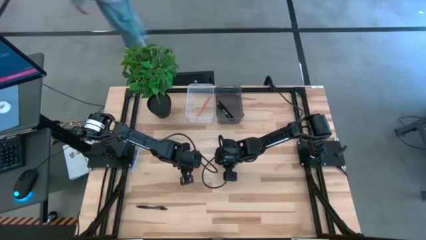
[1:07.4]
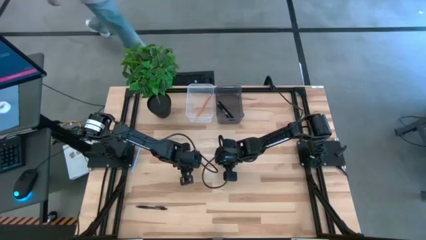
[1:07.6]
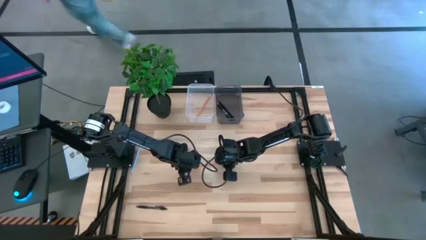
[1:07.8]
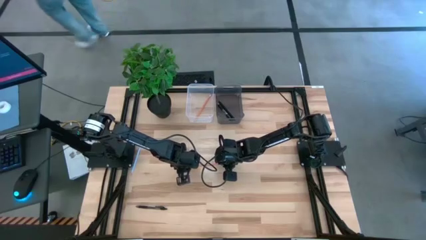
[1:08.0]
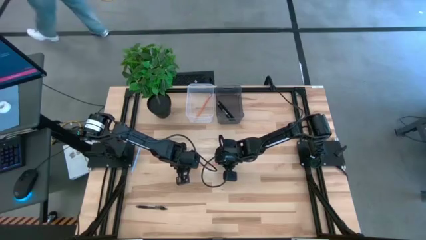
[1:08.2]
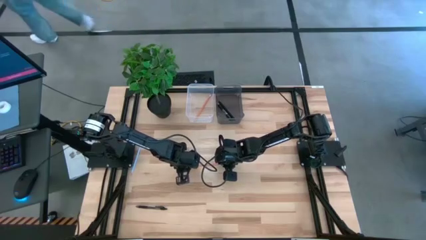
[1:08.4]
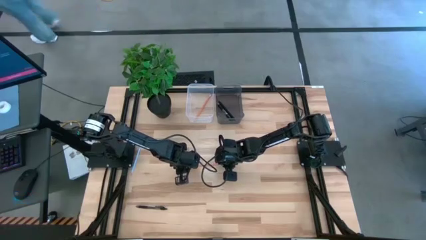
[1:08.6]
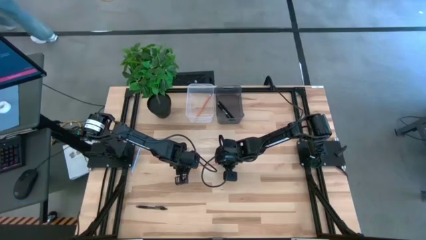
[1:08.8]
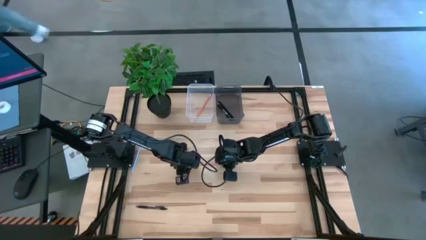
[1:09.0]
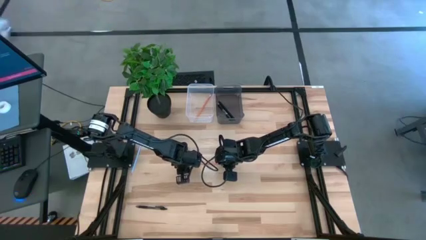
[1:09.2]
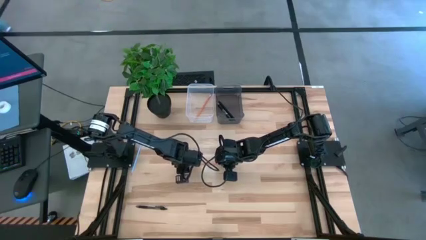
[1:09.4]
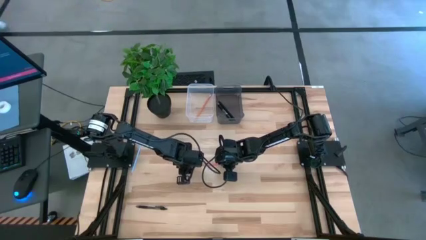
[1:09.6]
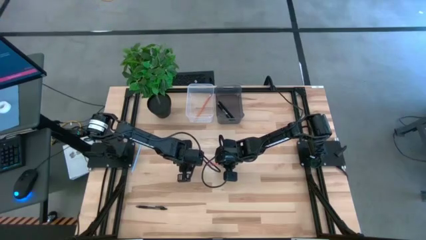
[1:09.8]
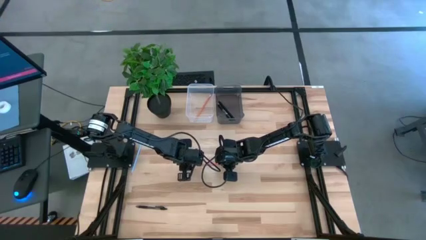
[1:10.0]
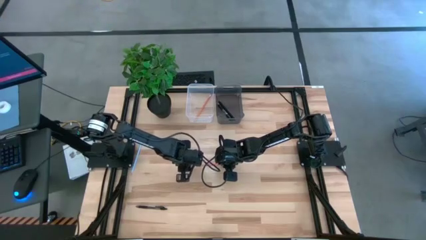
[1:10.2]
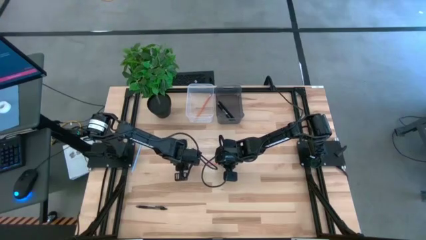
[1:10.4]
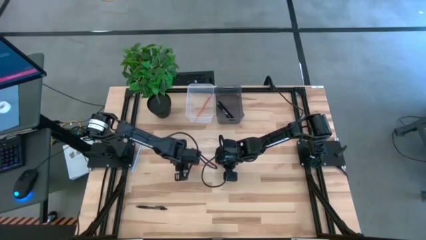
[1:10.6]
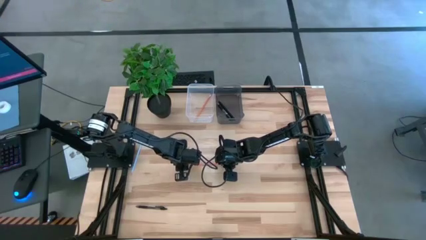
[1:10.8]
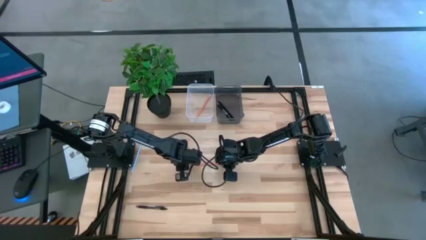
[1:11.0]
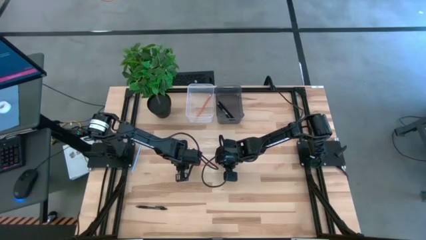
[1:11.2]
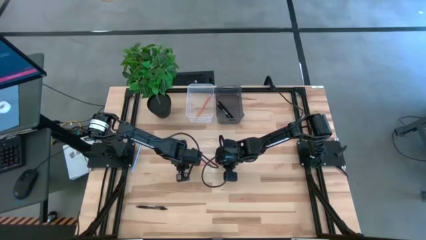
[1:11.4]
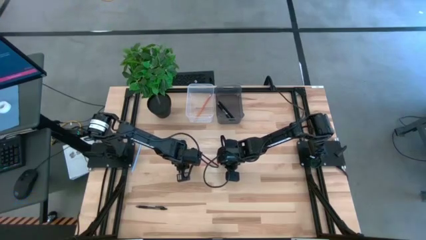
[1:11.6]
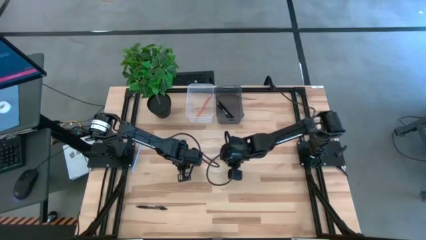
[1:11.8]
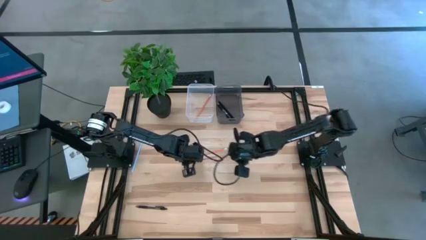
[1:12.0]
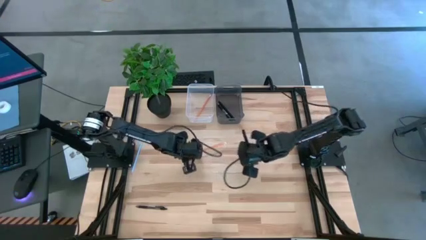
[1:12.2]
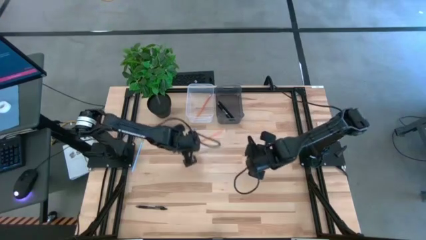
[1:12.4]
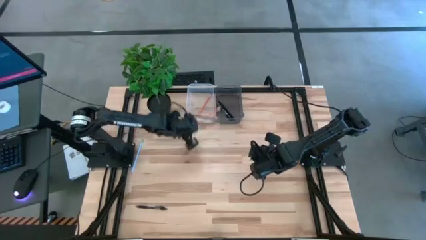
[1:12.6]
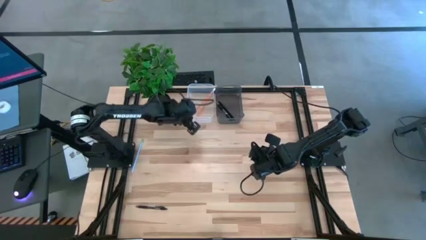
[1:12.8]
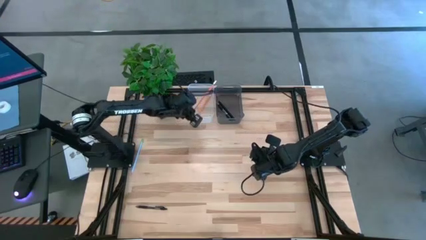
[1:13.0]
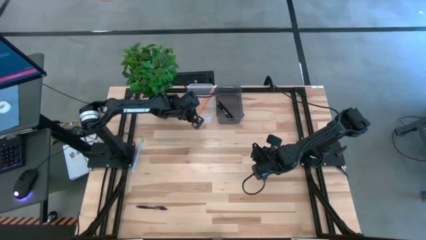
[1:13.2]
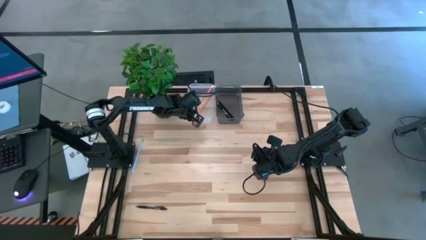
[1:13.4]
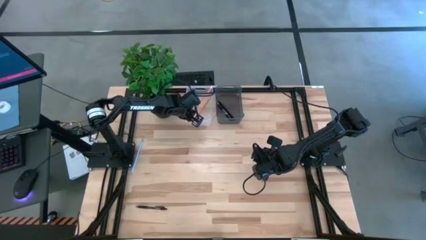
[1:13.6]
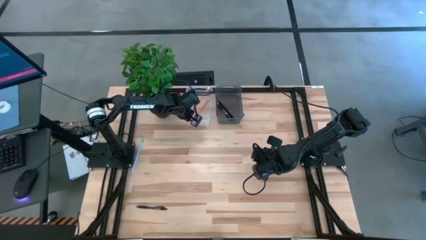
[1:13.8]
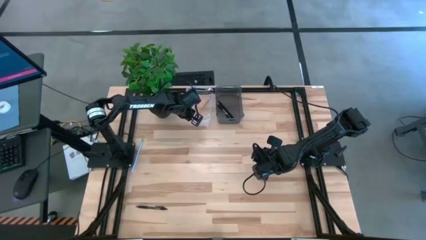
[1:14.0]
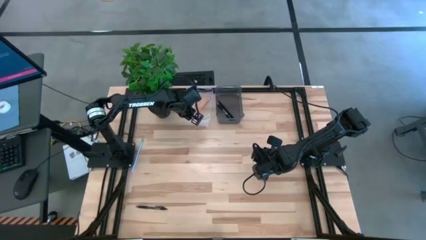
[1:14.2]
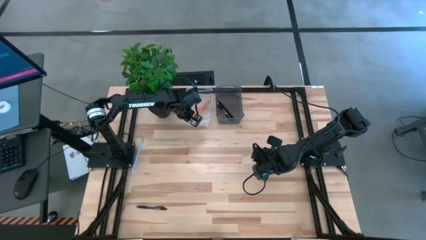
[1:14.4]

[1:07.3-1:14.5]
Task: Sort pens & pencils
Put the orange pencil into the transparent bin

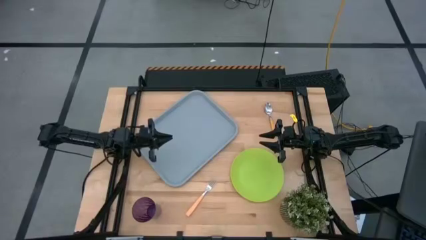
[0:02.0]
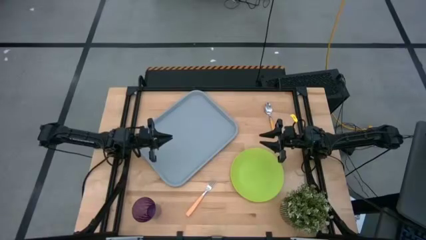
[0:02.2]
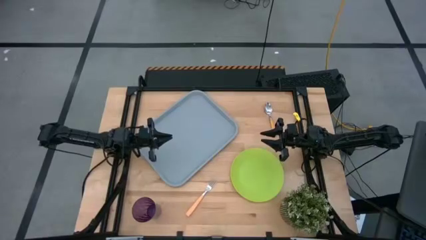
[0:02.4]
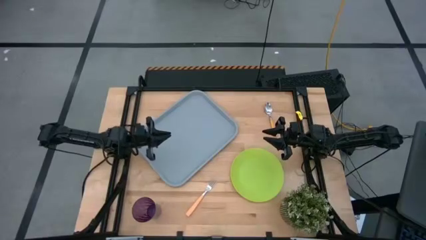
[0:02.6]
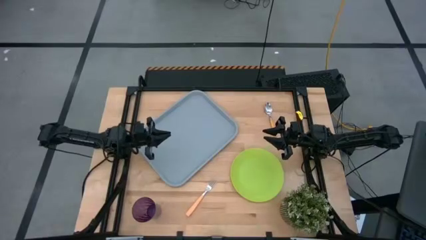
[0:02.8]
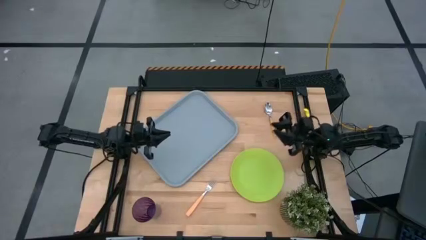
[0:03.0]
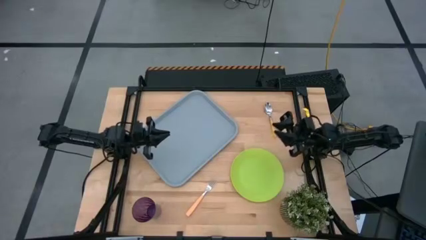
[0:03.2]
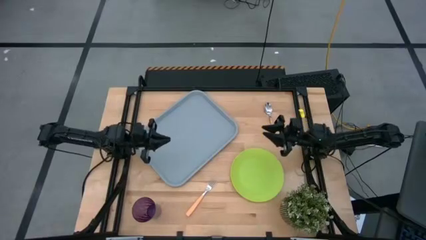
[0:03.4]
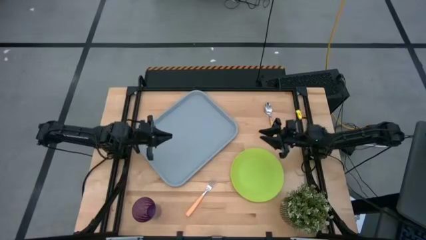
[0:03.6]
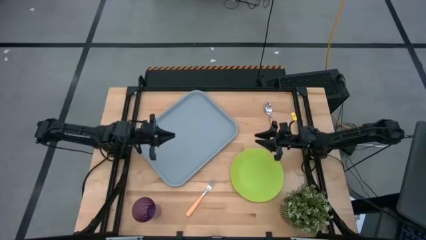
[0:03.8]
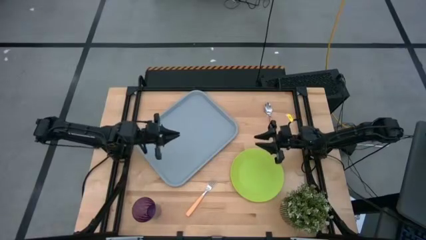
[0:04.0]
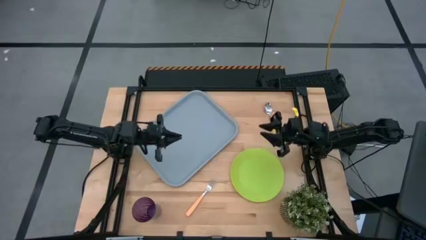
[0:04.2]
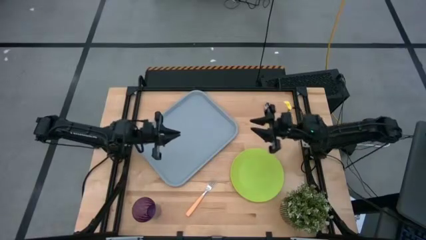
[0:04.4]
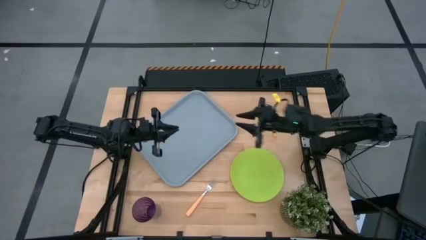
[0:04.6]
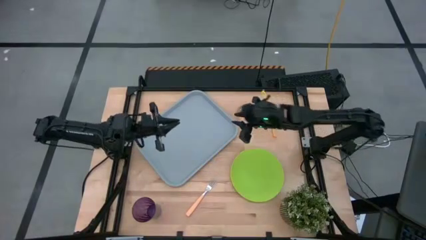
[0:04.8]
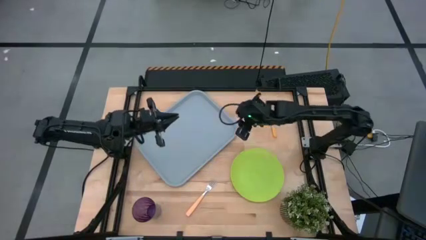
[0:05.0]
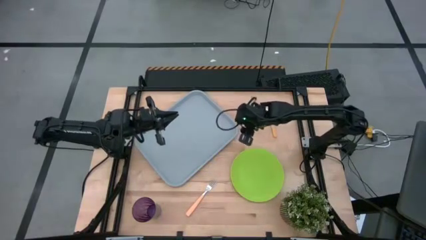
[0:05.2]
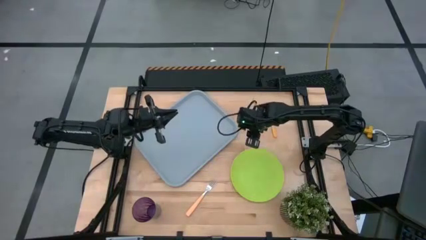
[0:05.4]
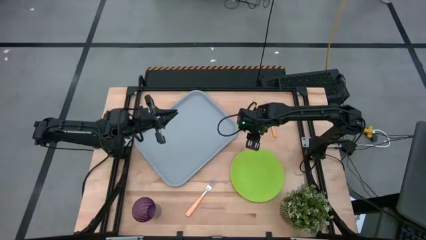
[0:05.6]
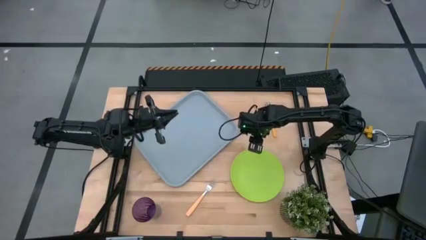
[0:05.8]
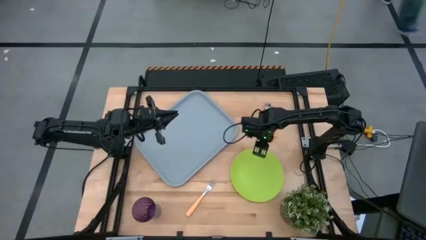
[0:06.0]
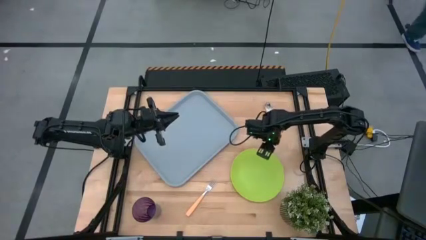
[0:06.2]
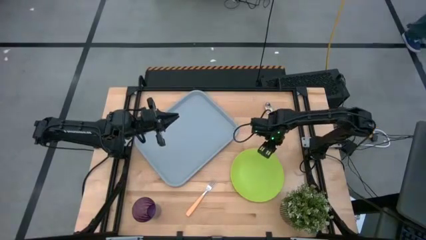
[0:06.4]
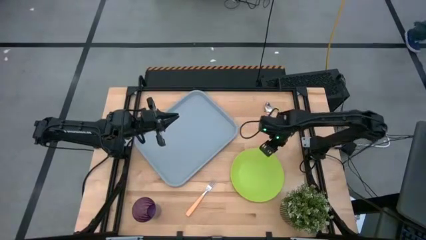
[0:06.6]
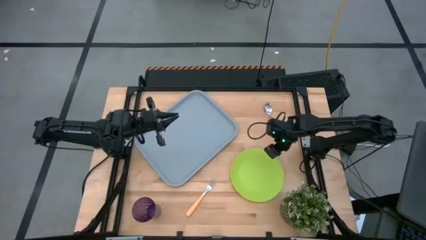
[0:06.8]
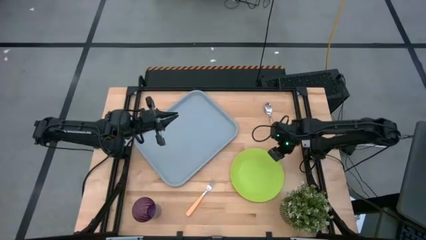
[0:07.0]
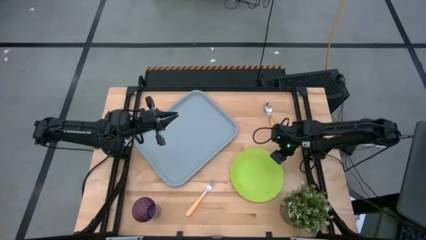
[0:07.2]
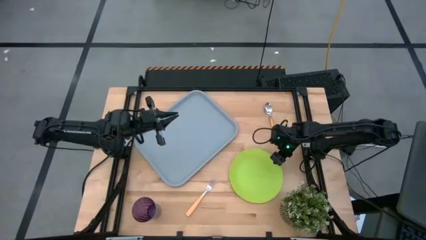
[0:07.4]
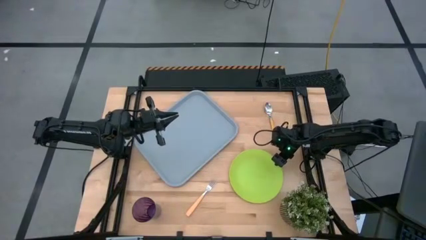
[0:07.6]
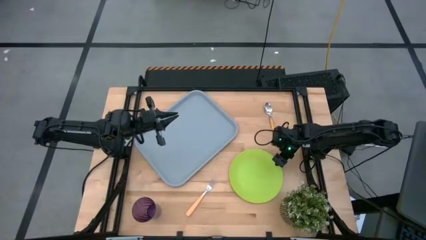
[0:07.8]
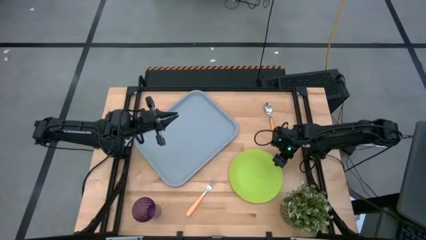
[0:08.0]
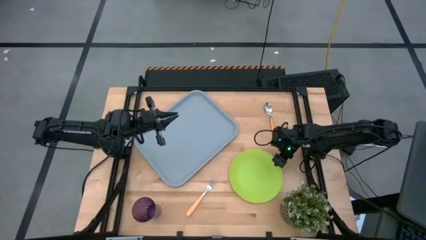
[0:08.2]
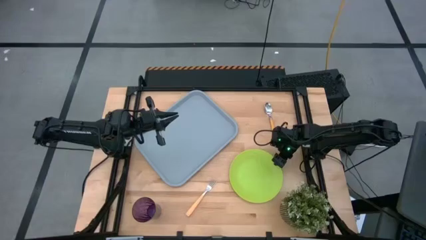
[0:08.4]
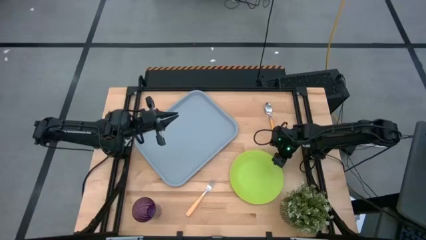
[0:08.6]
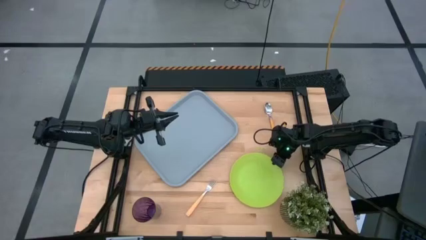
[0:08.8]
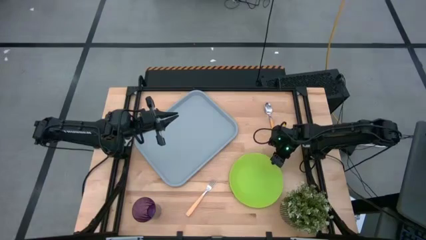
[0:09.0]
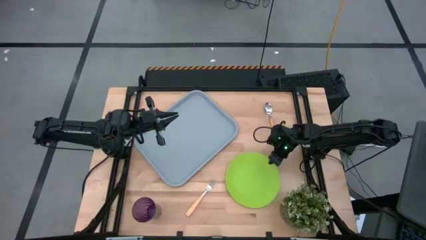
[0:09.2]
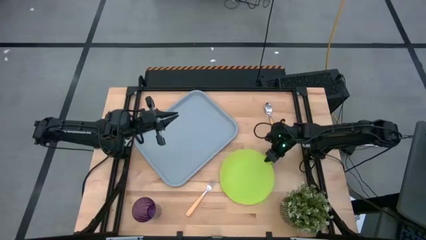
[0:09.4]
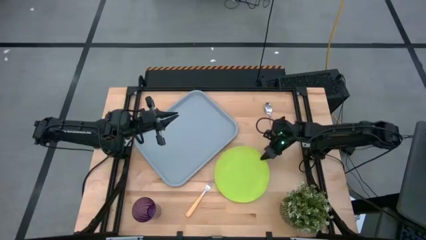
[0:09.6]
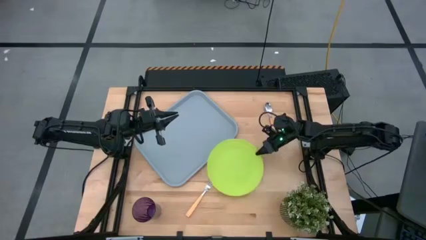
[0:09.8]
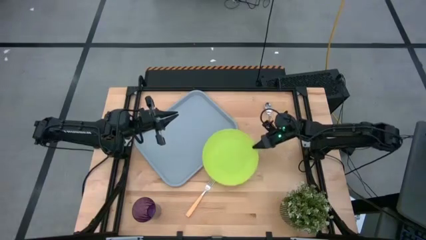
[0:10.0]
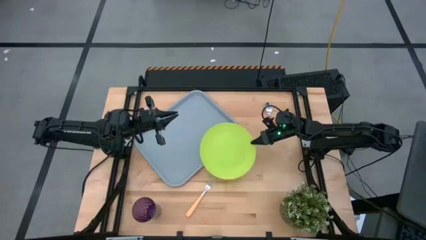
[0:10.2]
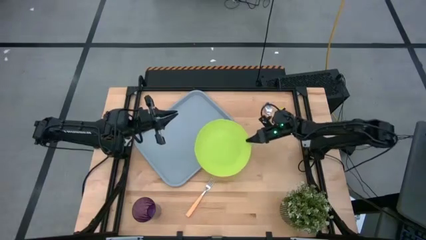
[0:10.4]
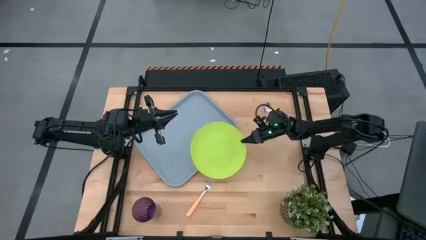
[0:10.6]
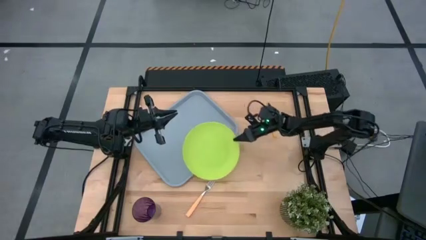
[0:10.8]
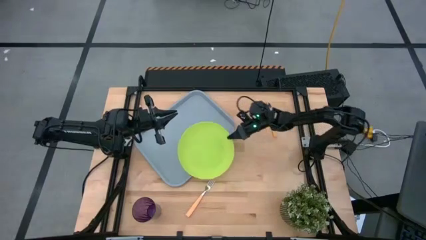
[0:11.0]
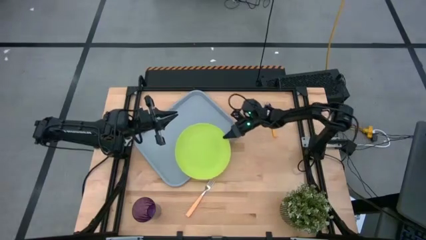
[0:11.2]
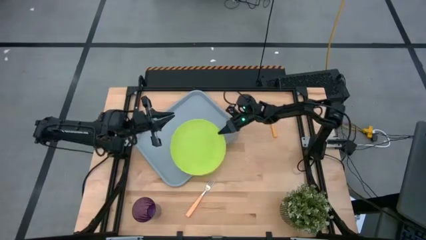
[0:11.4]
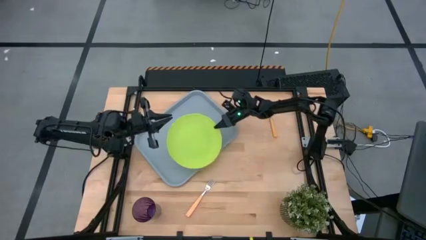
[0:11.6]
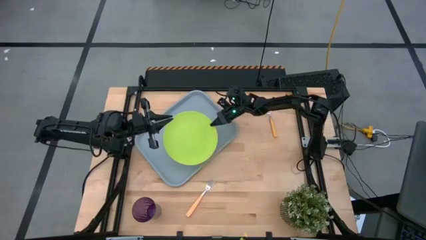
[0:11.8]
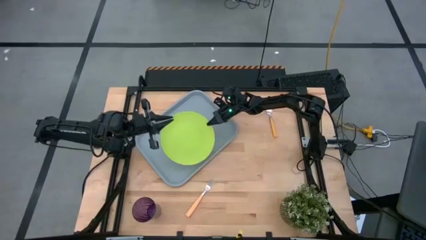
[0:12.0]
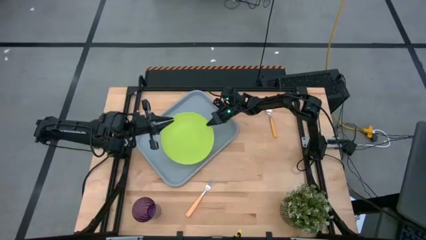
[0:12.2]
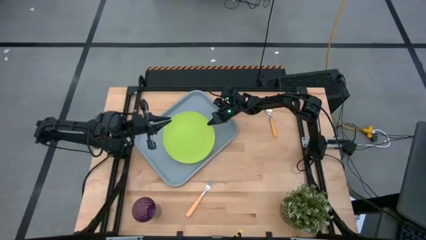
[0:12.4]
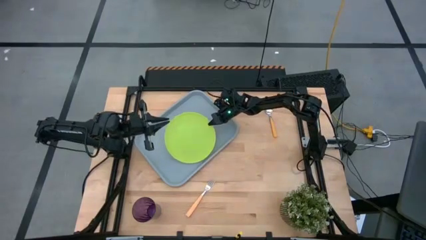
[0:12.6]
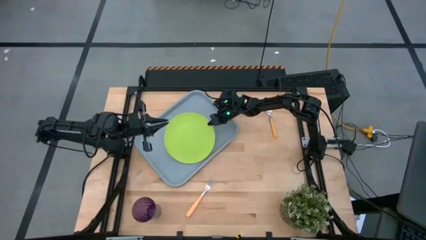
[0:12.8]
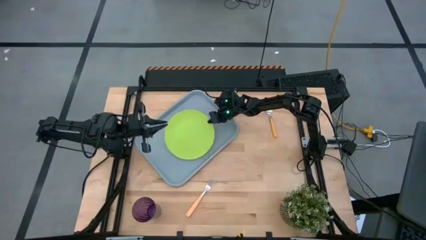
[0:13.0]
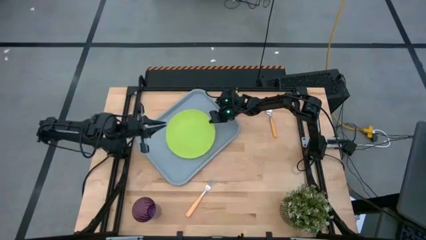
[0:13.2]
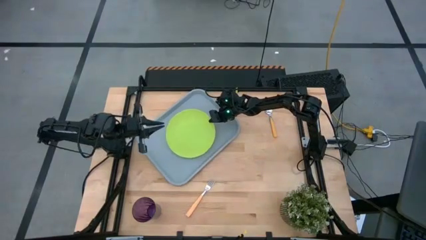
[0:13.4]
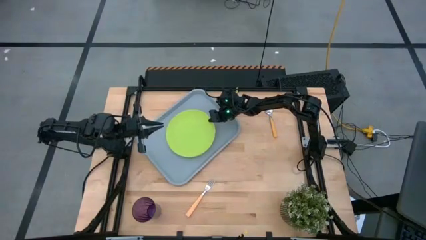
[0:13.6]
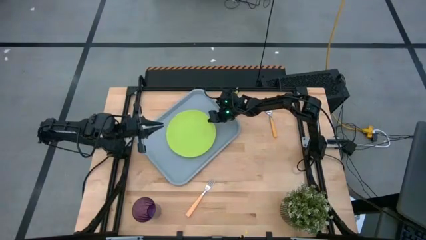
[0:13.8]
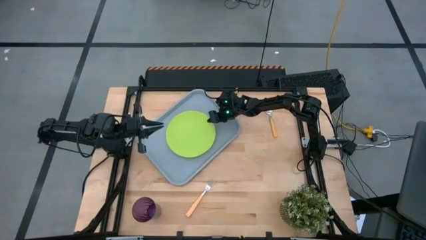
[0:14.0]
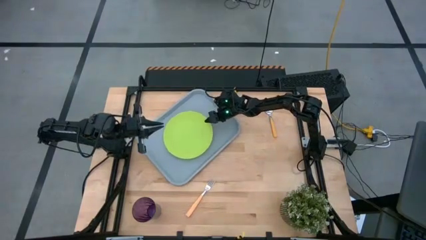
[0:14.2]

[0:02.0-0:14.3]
Task: Pick and place plate/cup/fork/spoon on tray
Put the green plate on the gray serving tray
